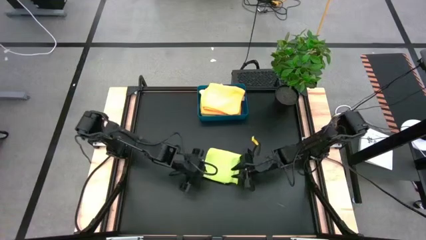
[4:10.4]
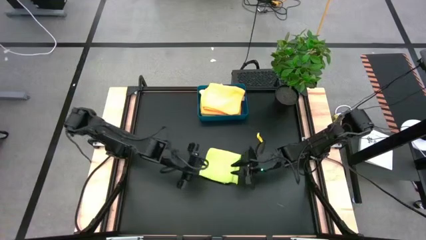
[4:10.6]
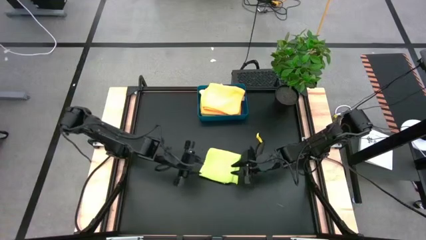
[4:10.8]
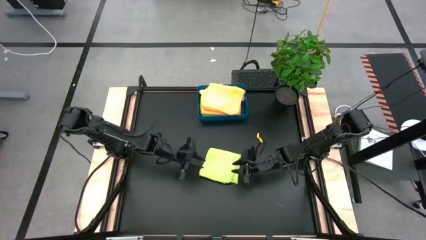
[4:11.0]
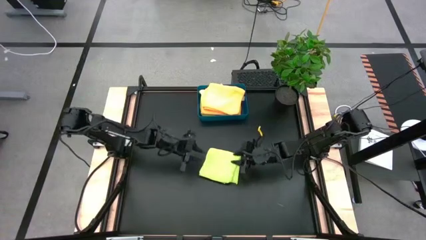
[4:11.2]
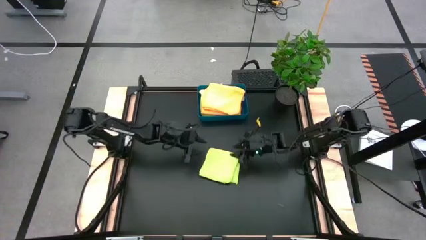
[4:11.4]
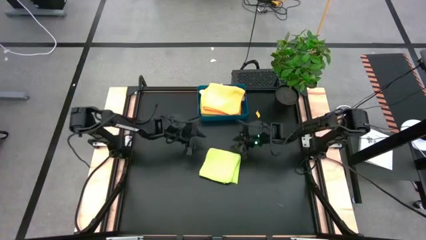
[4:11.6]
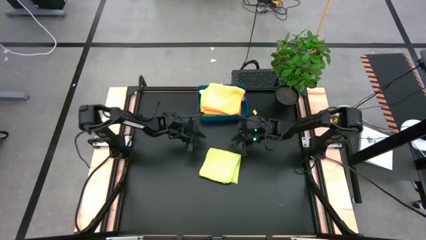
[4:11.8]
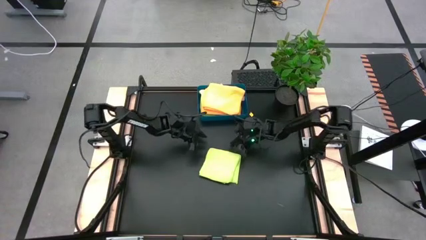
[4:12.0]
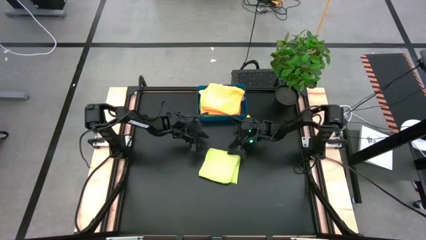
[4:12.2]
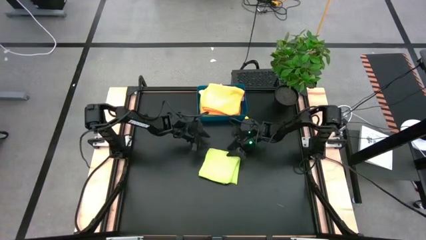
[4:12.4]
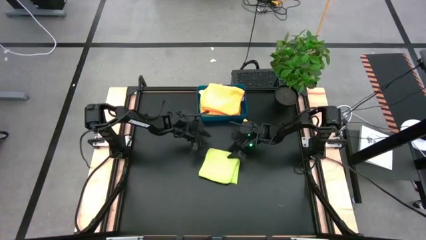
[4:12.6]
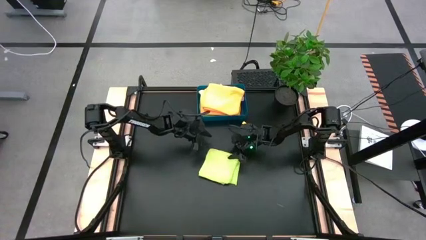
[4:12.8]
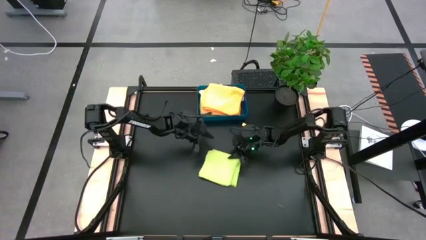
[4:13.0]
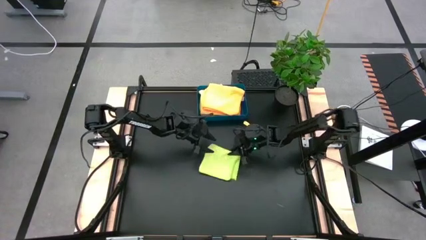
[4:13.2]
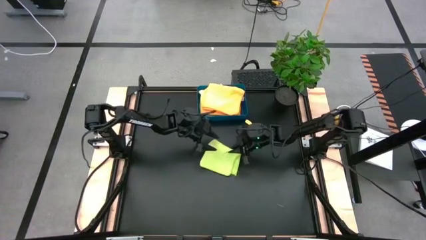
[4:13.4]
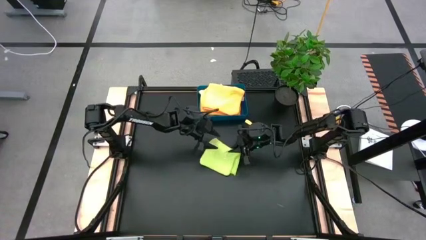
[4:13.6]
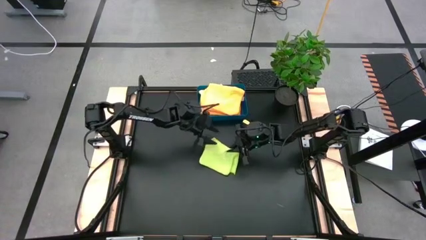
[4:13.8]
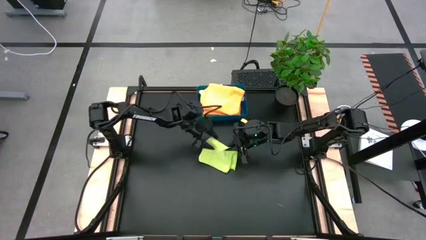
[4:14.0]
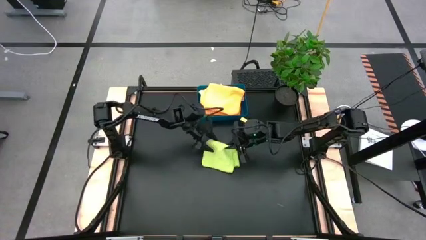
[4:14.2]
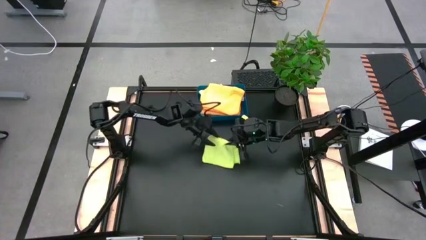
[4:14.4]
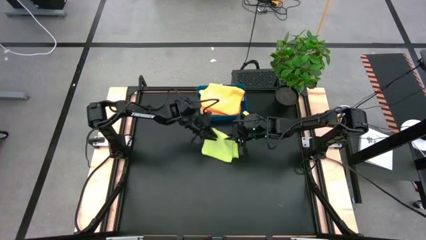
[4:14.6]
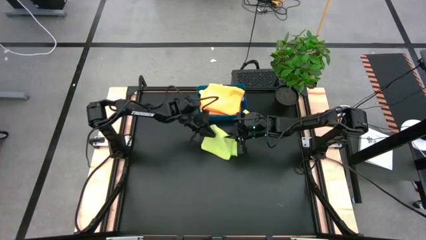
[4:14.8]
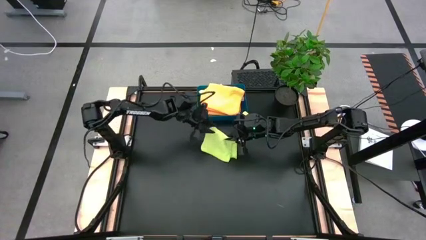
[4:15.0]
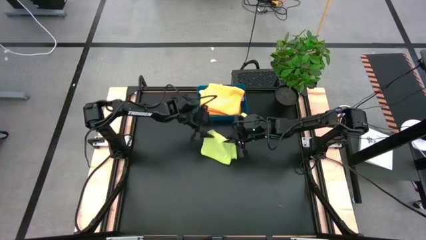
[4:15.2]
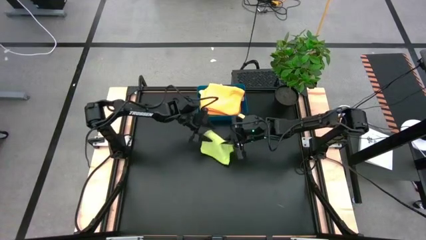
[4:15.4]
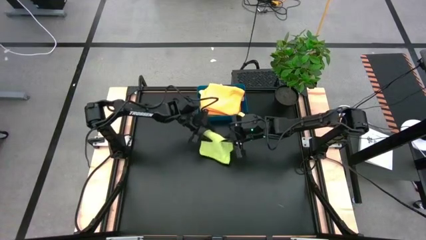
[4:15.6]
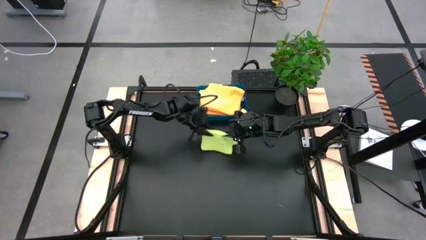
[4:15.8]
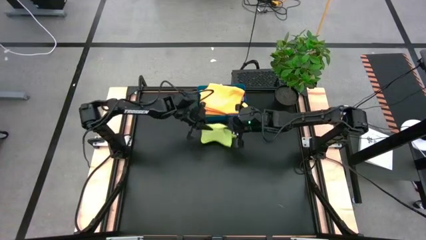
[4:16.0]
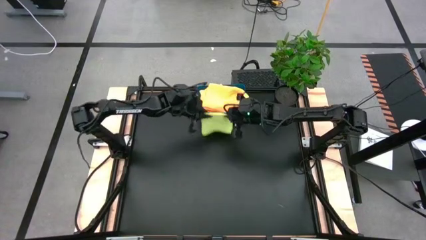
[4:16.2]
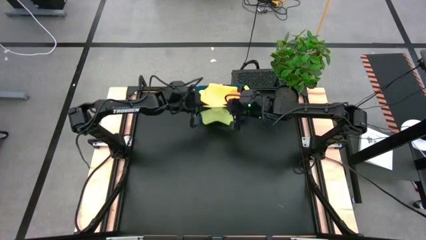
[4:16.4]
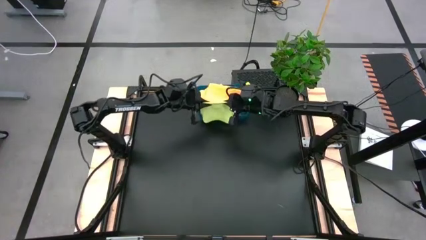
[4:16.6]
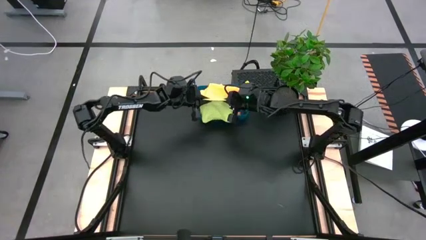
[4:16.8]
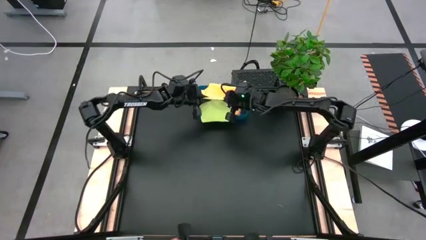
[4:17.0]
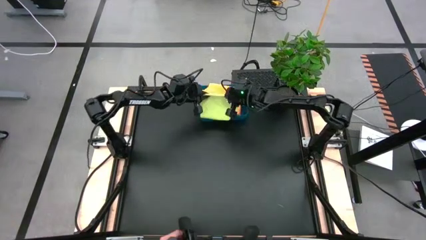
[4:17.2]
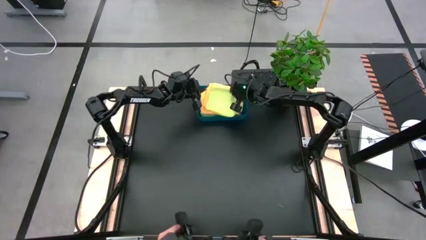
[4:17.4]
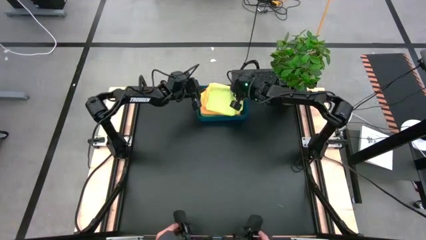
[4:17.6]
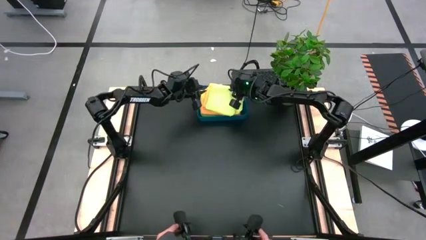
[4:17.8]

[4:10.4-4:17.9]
Task: Fold microfiber towels
Stack the green microfiber towel on top of the orange microfiber towel in the bin

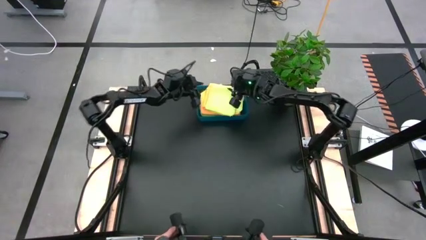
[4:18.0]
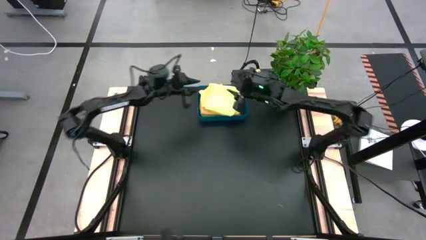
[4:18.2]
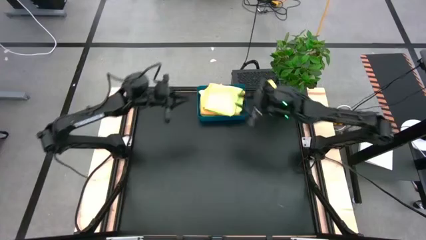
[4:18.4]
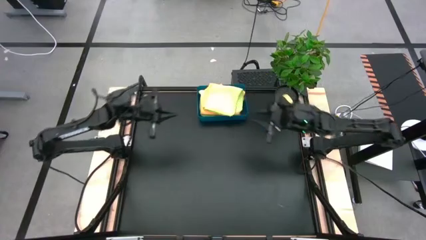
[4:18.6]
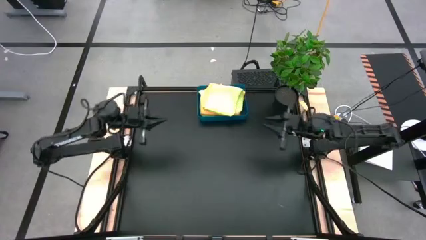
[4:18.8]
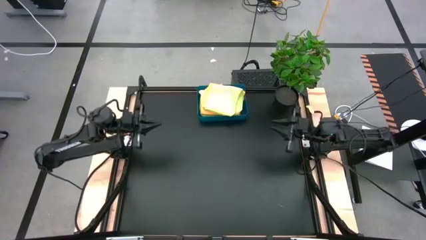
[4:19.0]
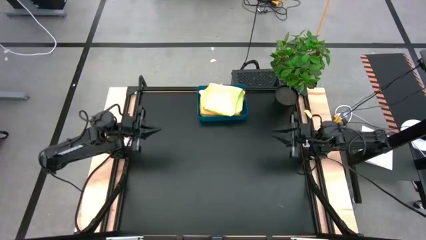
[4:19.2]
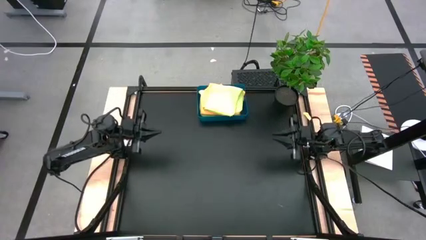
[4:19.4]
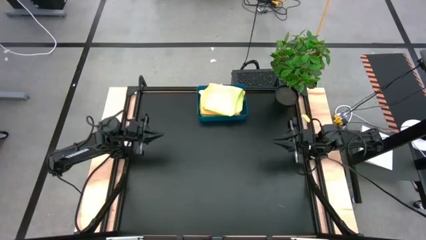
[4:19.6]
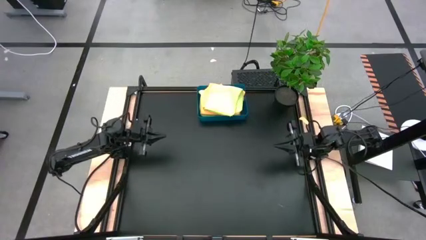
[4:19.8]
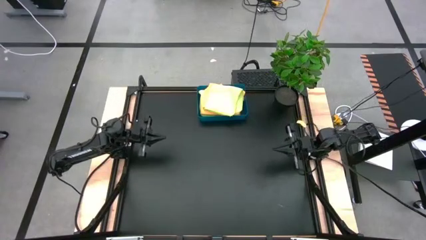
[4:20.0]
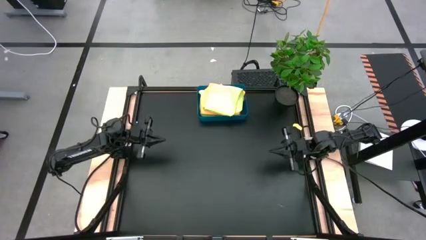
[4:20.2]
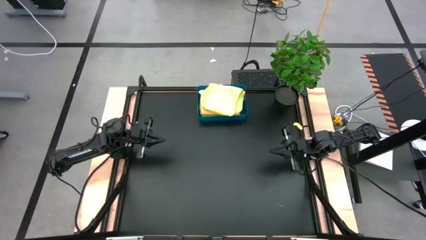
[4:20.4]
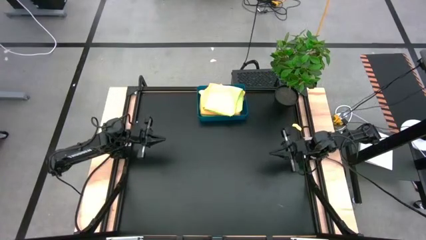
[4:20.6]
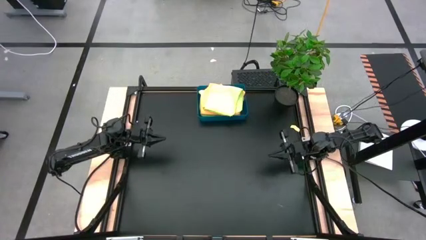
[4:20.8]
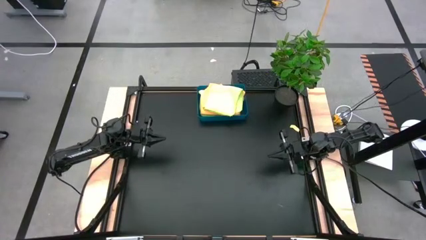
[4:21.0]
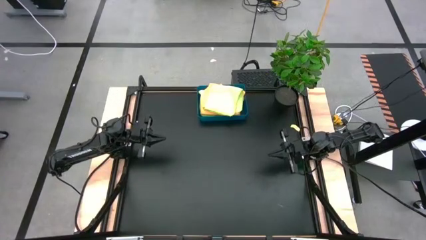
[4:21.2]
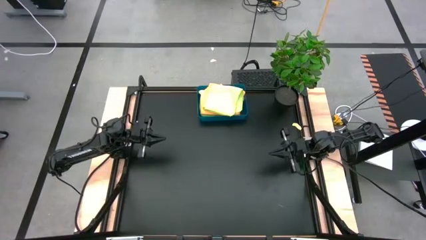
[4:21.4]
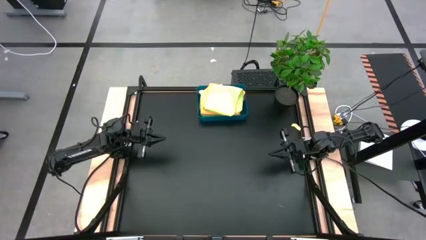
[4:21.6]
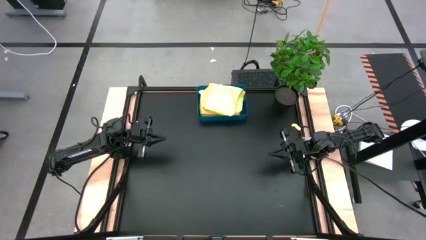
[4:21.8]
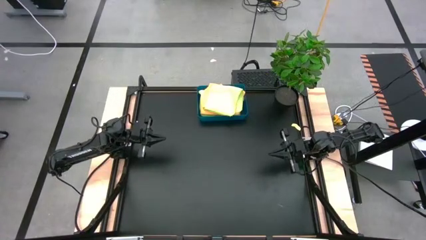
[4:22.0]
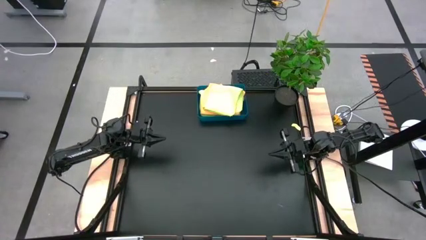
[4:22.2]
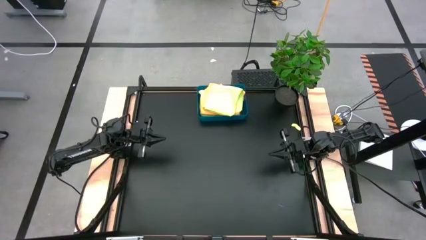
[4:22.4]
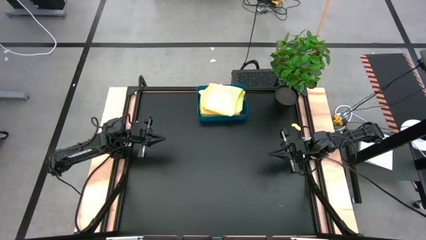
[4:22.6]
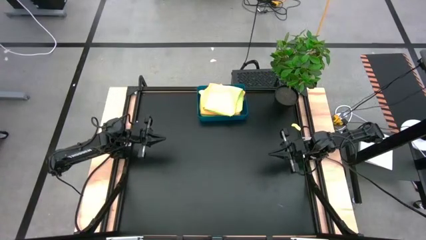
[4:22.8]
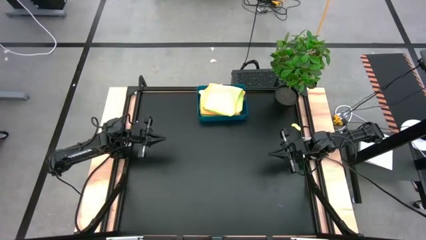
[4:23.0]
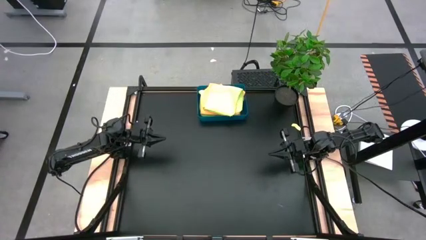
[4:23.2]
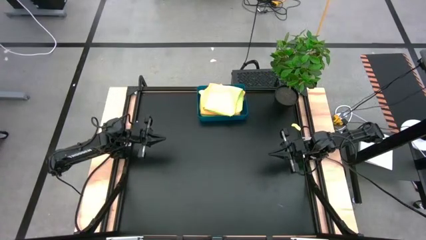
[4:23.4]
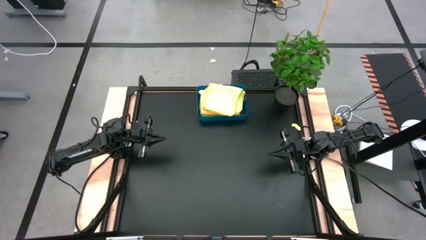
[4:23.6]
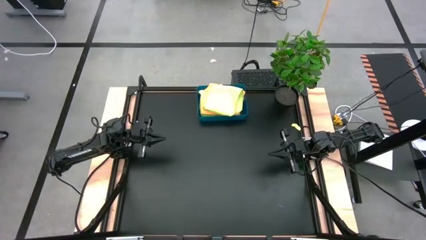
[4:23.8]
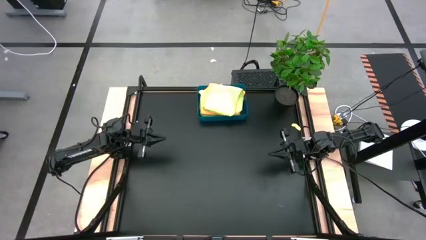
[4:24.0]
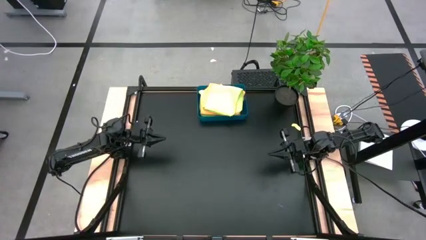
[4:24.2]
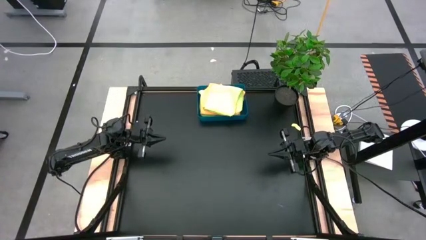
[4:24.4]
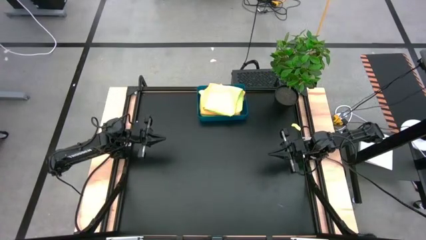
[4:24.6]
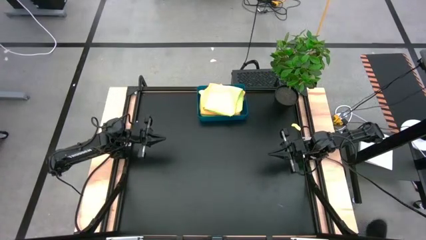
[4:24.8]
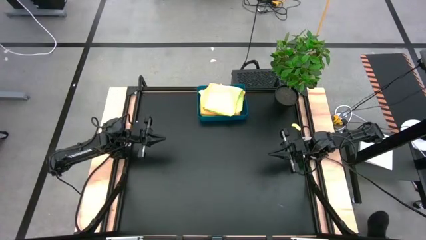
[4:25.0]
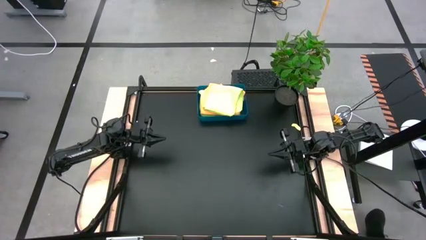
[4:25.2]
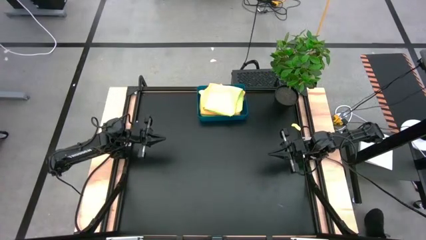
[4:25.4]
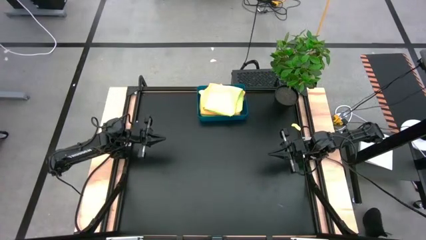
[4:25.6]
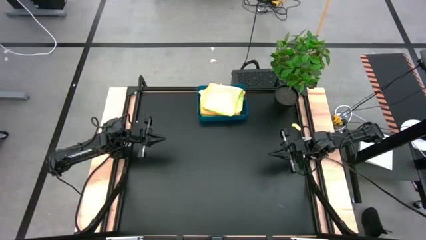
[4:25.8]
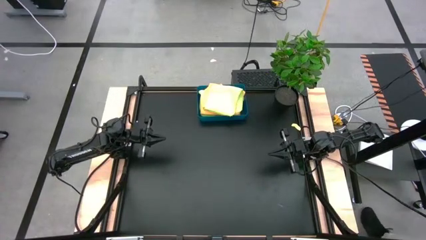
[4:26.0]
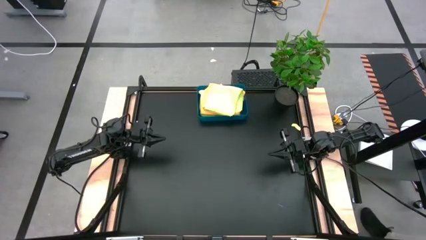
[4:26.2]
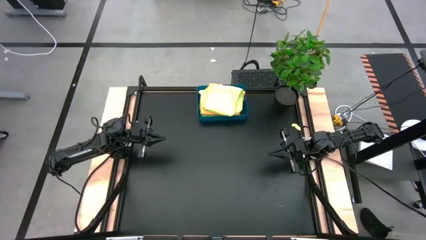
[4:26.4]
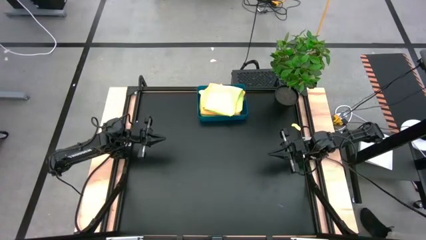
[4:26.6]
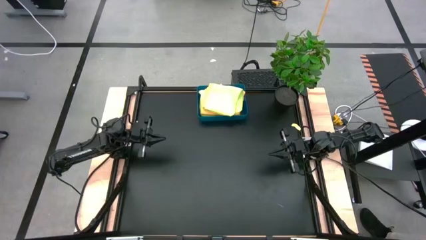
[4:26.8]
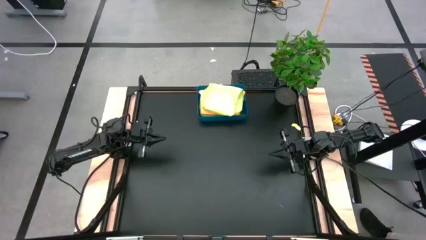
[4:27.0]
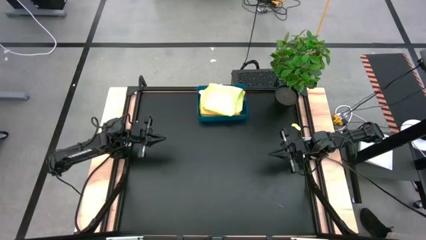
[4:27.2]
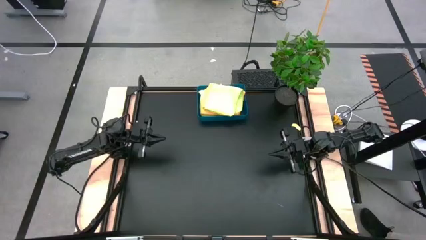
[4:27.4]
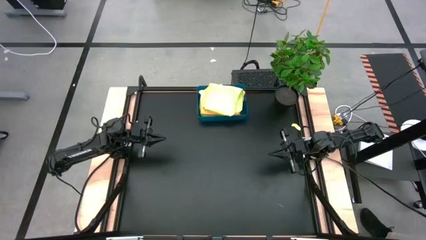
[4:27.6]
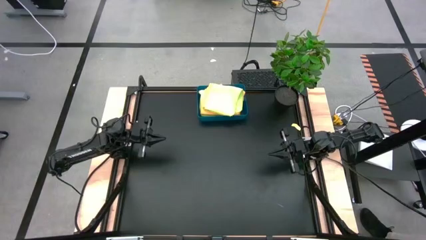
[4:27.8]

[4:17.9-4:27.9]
Return to Home Position
